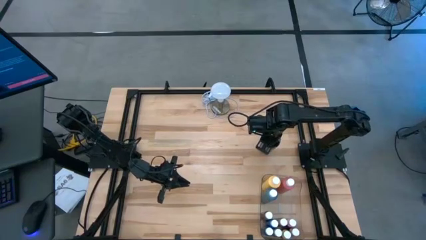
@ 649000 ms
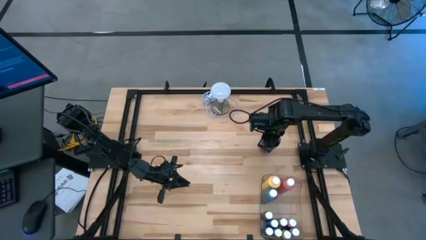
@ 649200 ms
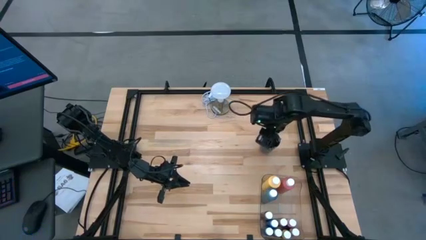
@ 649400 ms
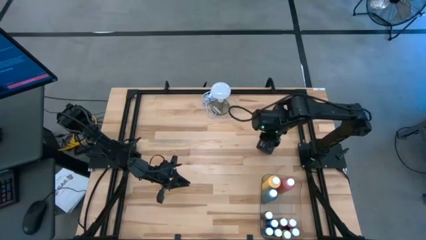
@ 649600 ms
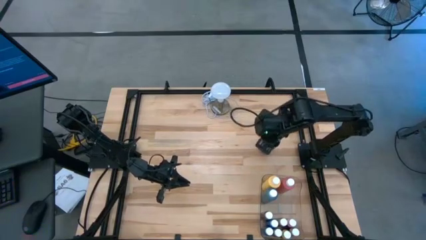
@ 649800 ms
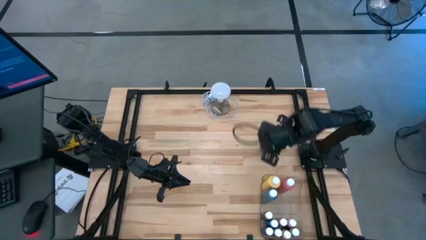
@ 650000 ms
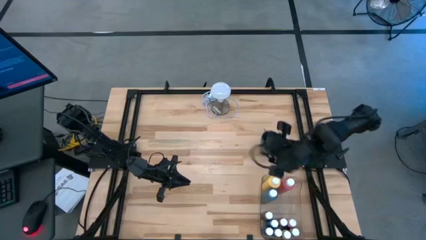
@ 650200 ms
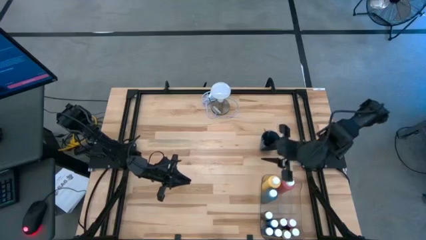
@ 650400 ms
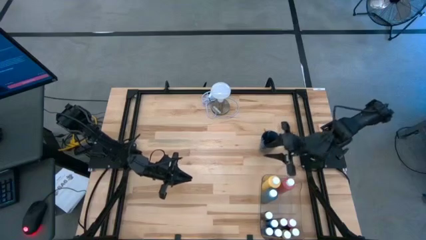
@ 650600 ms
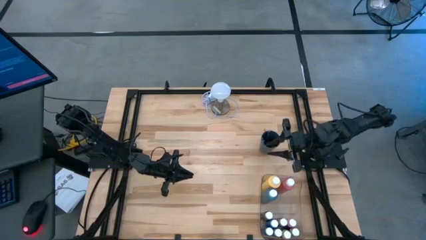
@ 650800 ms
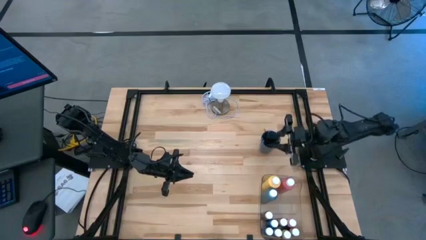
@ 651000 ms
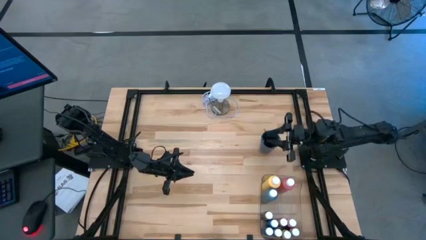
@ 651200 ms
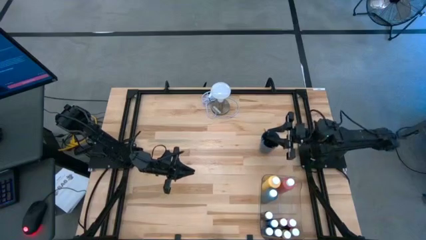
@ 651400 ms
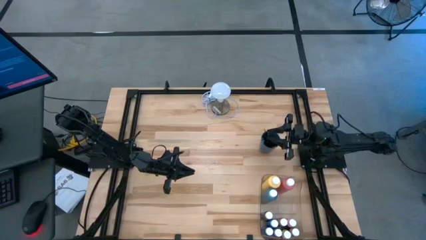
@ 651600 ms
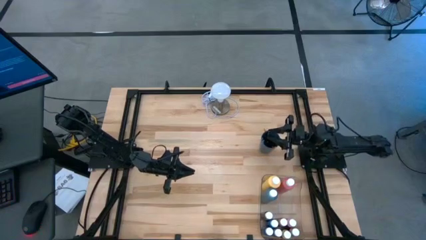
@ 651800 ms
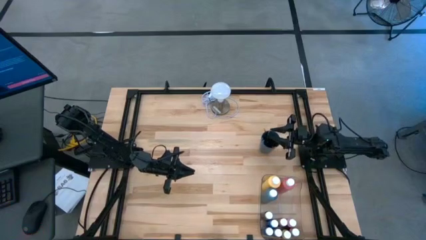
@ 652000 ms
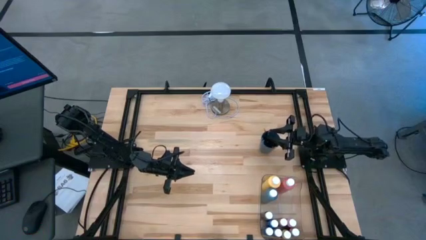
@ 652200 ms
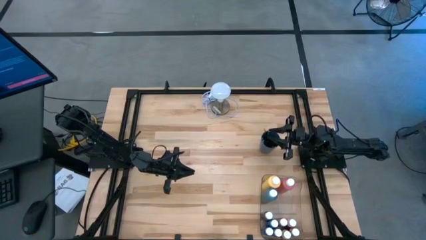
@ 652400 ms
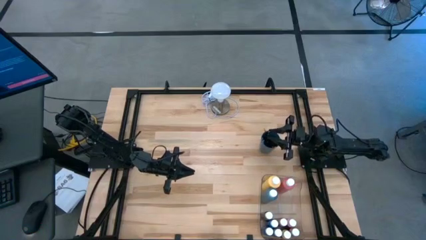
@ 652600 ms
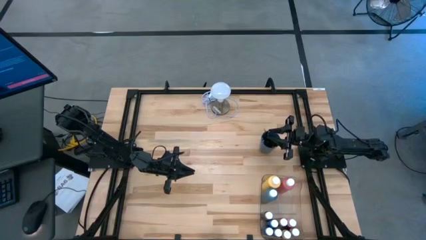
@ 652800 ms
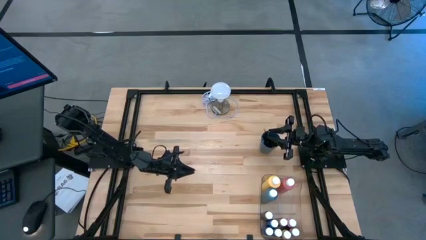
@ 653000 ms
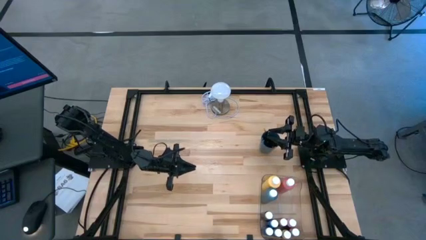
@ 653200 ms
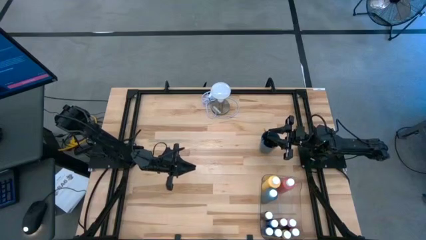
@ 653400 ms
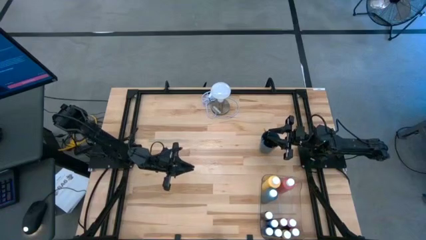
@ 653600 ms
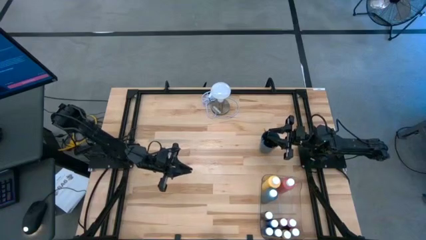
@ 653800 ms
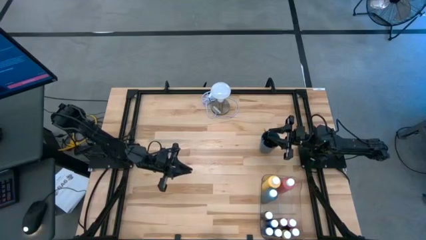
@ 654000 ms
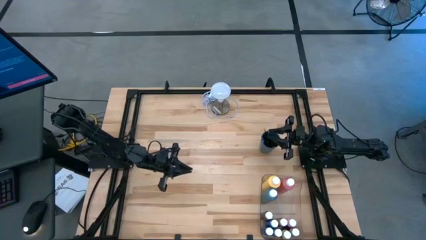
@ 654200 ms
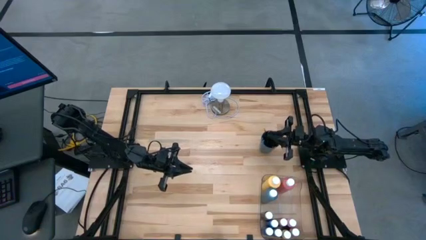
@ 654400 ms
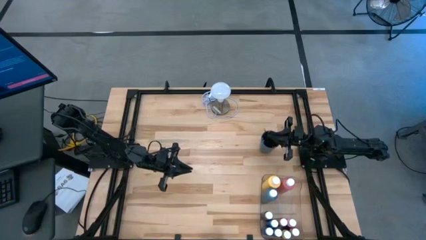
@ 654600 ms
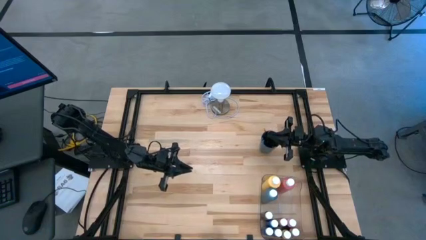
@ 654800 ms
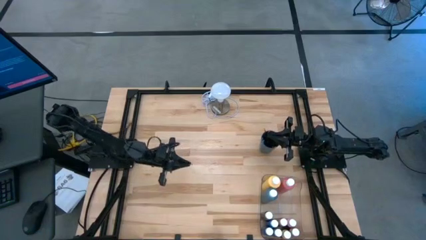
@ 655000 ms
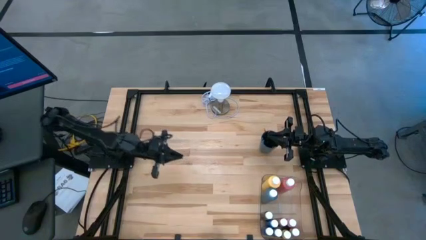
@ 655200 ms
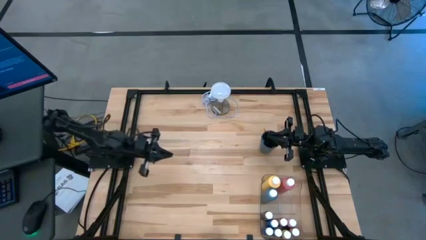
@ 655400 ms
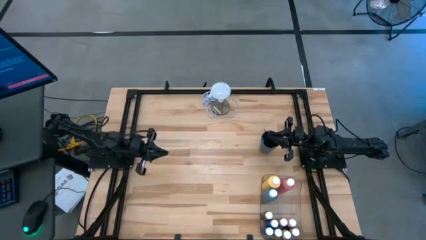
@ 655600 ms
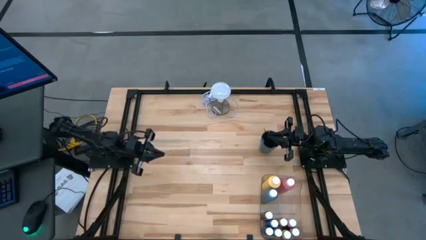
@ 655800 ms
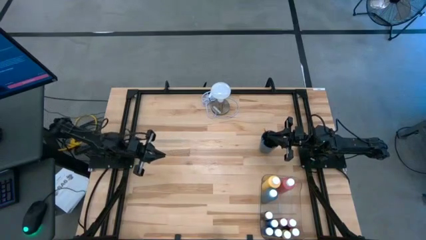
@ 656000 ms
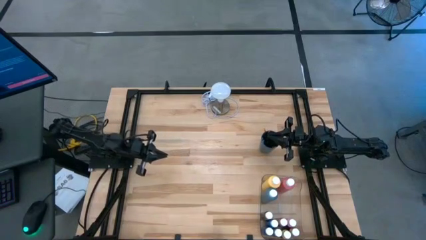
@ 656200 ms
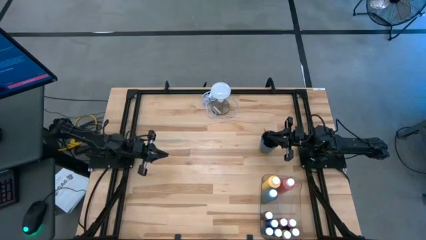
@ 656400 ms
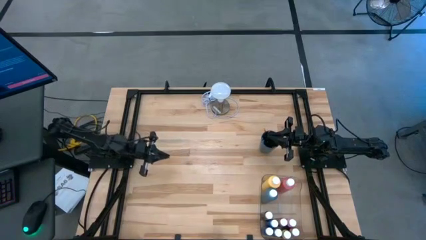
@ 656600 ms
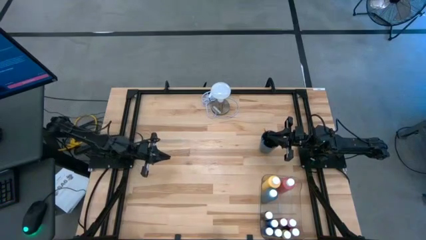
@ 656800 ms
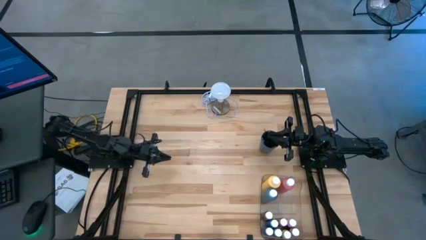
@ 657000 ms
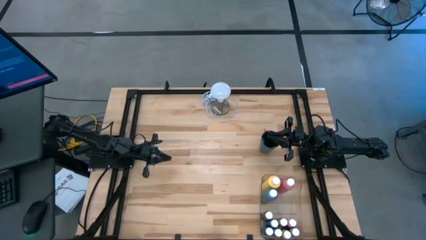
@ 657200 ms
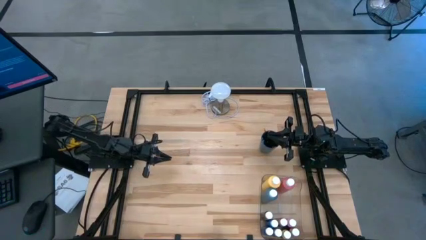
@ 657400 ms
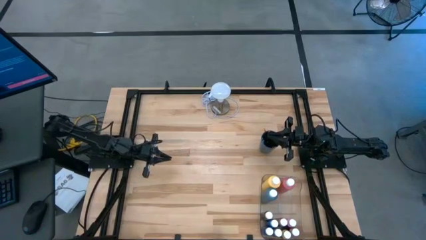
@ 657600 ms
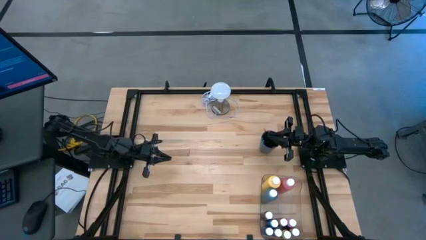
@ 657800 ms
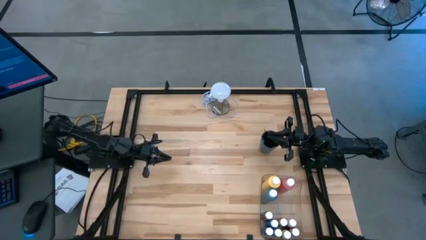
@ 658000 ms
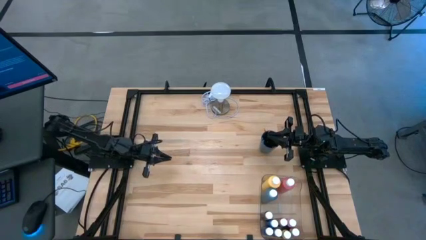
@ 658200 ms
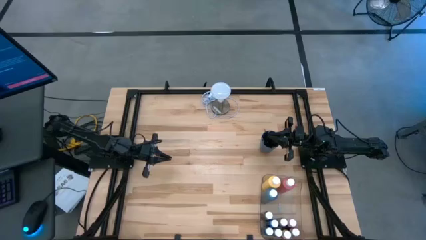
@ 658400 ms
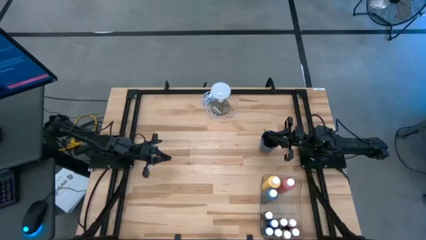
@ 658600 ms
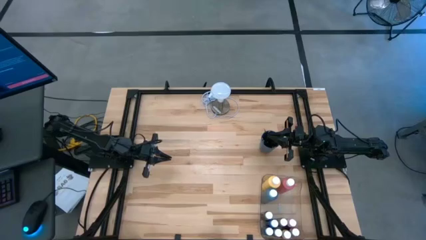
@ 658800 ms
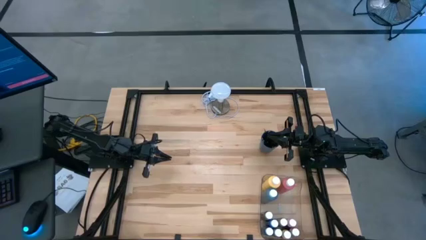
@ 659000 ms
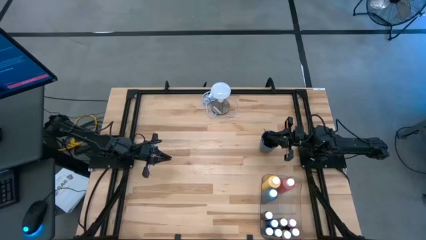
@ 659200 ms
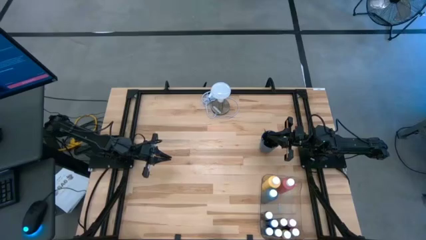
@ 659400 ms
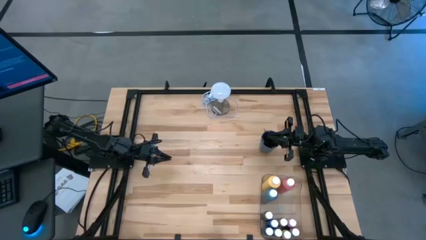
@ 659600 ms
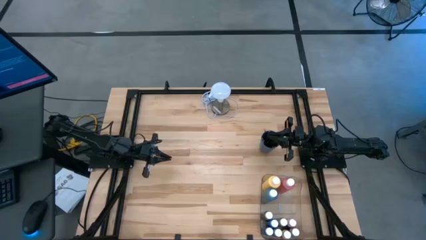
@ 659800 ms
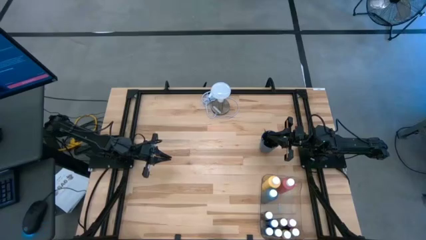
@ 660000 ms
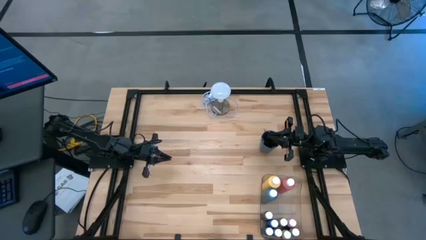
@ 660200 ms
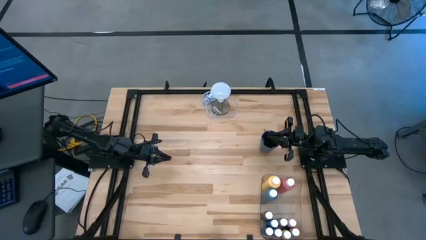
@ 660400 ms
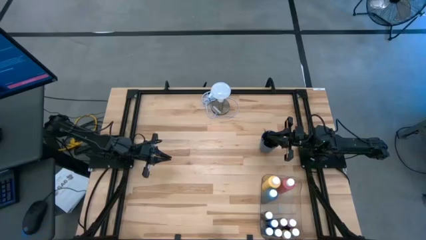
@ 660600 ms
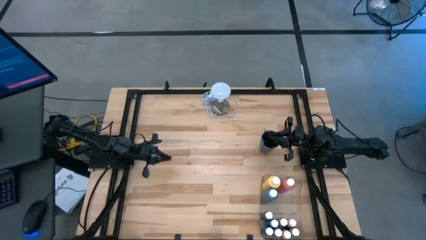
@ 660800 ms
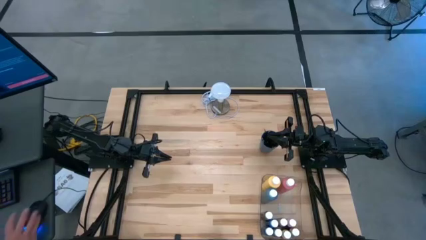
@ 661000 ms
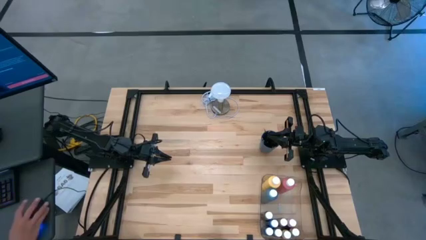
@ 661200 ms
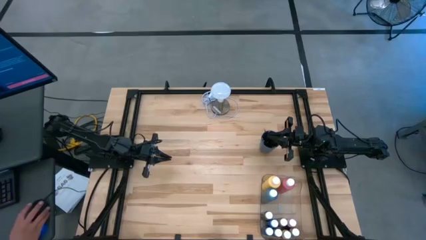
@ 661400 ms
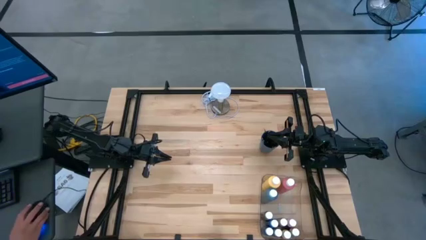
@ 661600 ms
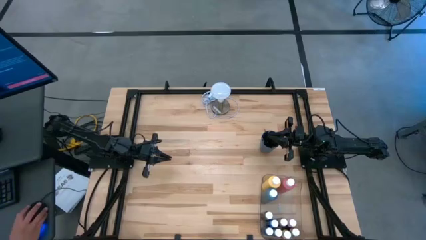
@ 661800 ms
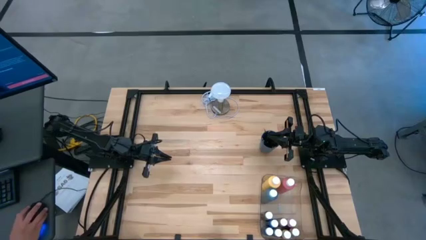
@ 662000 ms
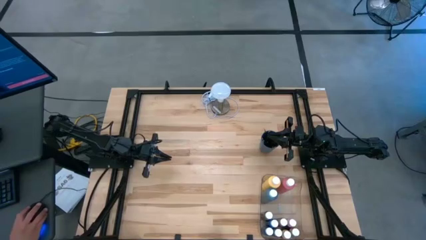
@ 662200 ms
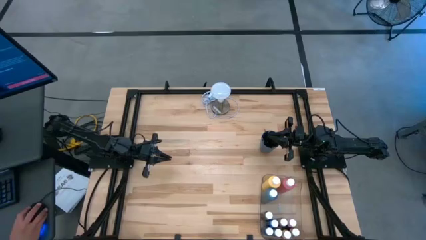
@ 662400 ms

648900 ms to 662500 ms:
Task: Pick & Place Paint Supplies
Return to Home Position
